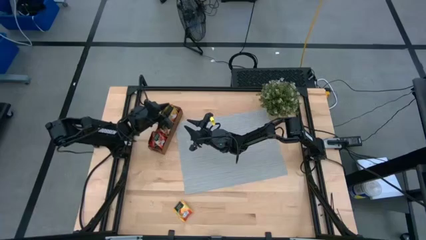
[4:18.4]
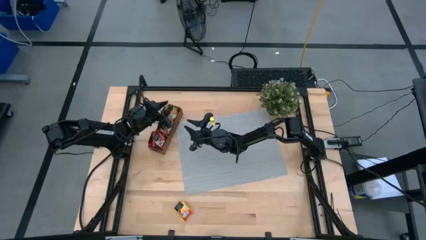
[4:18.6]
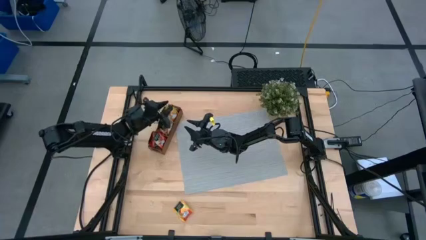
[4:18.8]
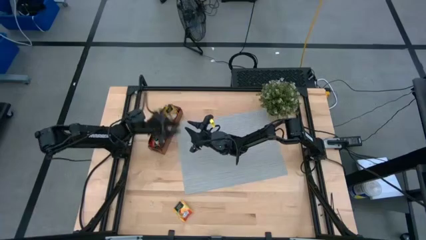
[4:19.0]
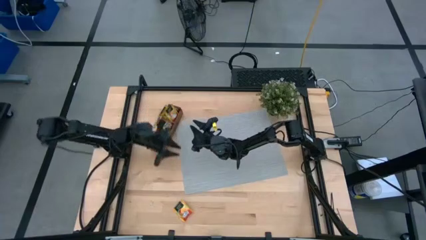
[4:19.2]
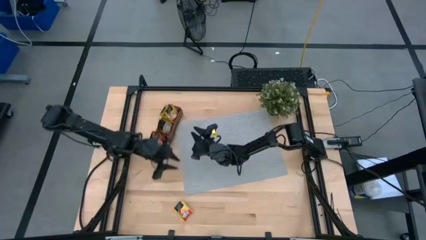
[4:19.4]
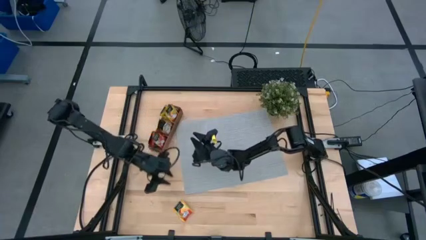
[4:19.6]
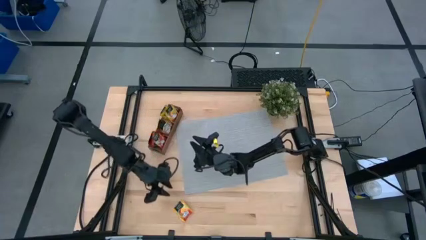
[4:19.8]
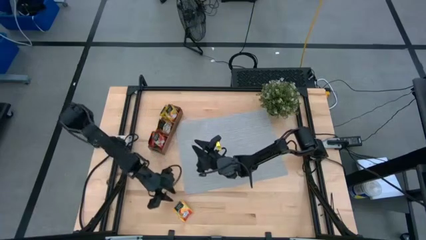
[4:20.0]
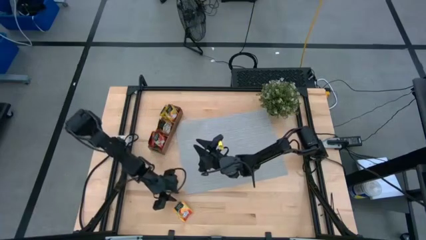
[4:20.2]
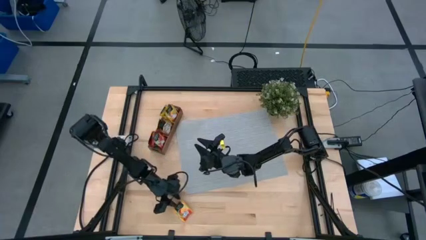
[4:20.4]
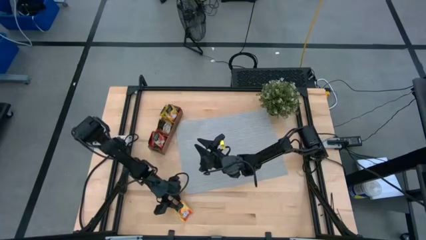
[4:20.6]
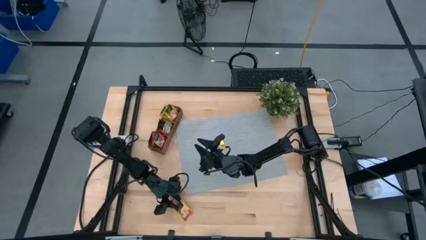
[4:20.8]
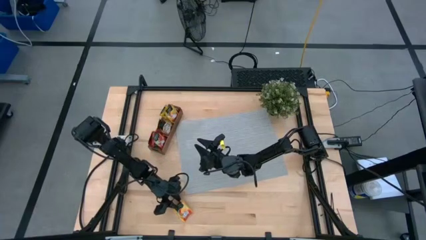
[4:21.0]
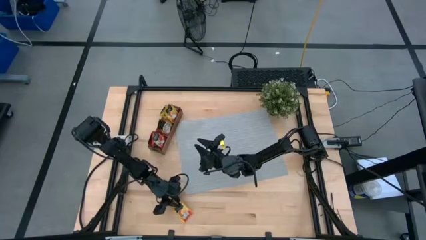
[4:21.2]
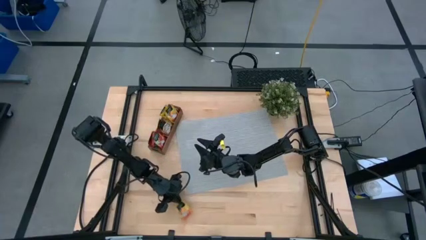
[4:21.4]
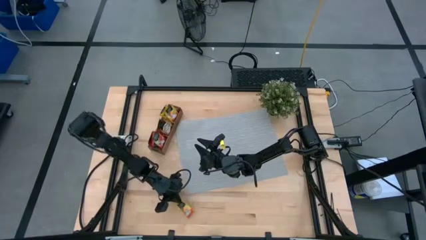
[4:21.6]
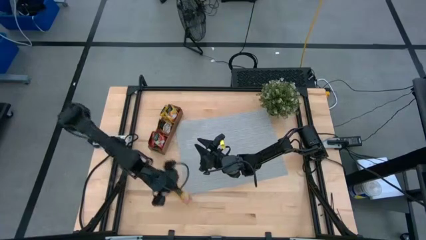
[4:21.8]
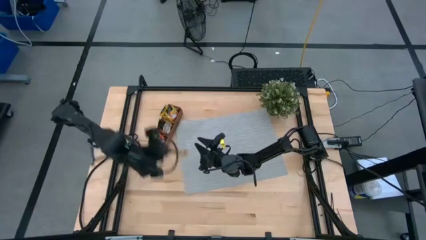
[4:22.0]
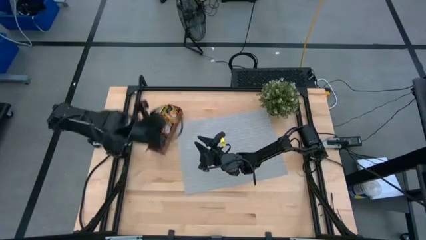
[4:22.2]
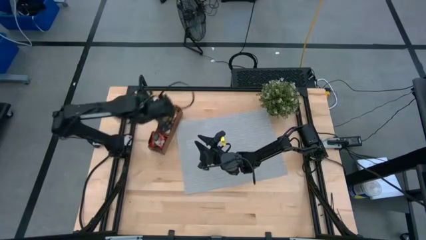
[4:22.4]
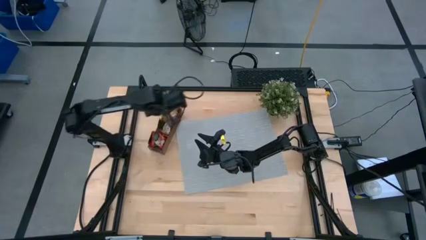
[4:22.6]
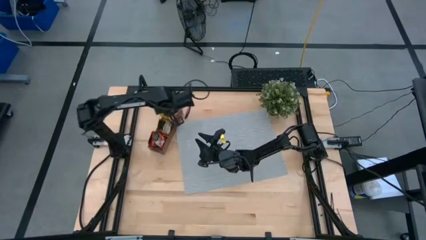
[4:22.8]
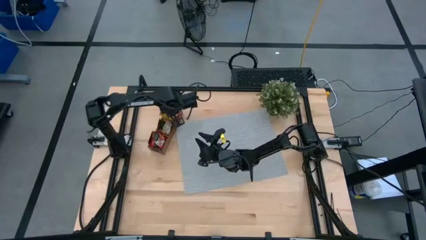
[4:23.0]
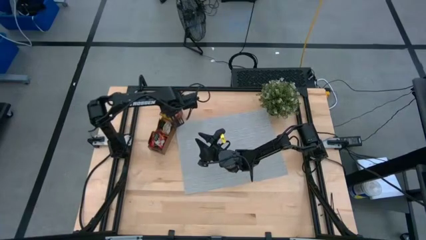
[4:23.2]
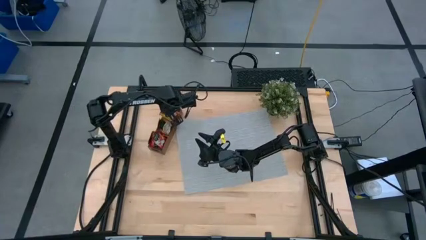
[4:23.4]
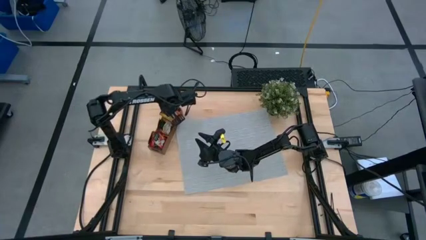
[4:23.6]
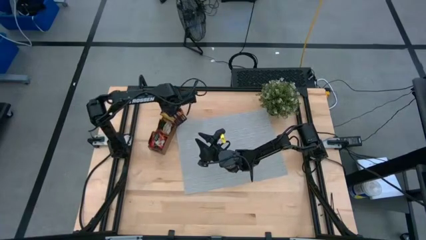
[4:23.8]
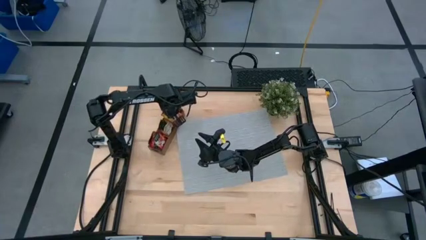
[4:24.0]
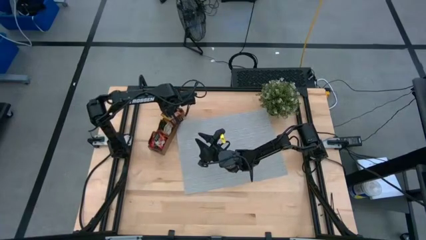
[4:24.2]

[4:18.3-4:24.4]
Task: Pick & Place Tea
Put the yellow tea bag into the right section of the wooden organizer

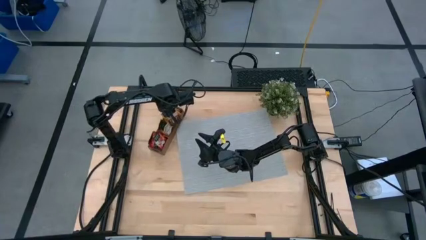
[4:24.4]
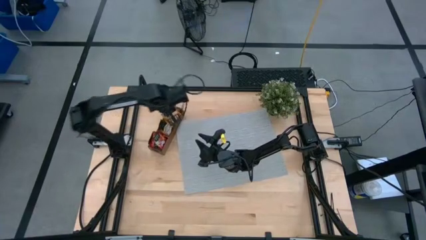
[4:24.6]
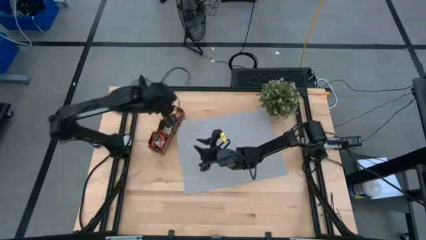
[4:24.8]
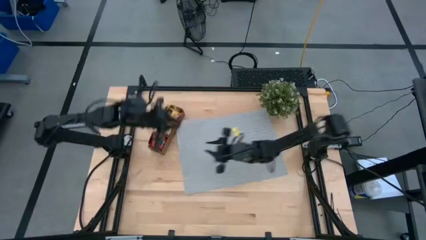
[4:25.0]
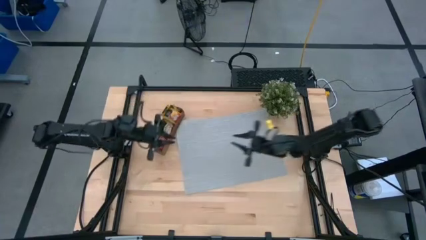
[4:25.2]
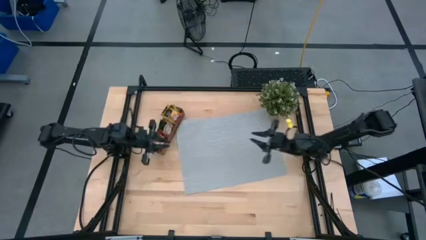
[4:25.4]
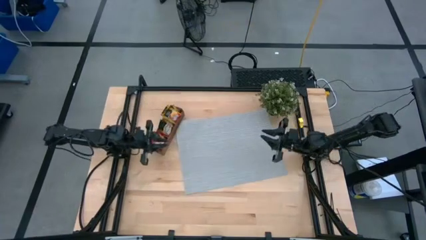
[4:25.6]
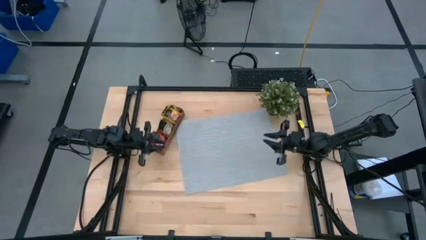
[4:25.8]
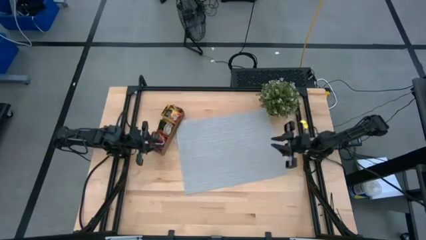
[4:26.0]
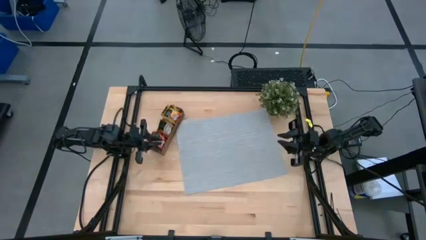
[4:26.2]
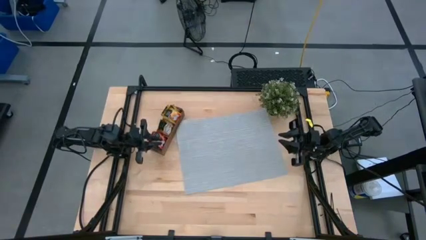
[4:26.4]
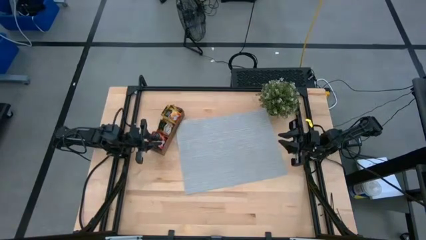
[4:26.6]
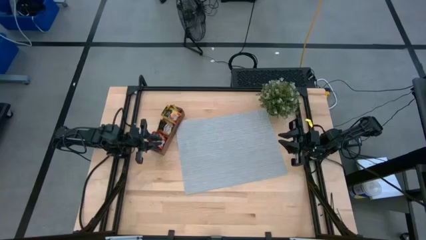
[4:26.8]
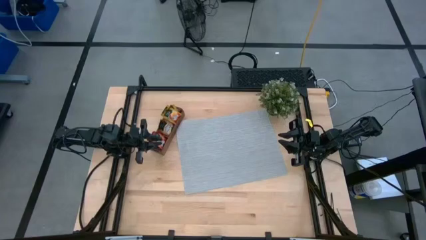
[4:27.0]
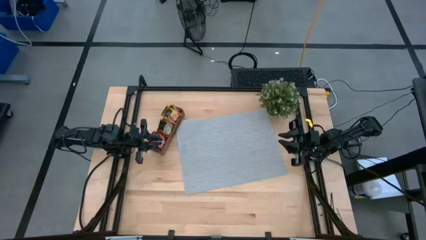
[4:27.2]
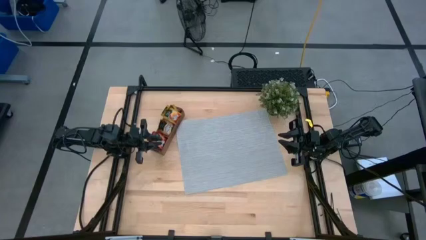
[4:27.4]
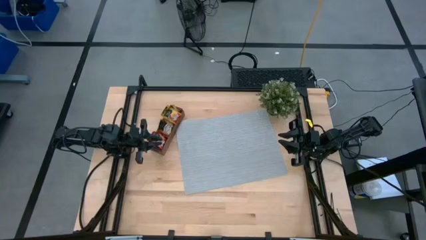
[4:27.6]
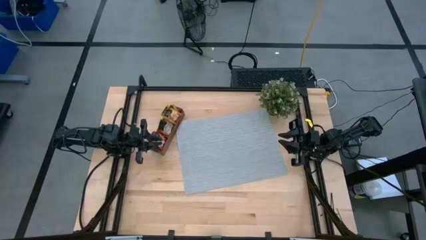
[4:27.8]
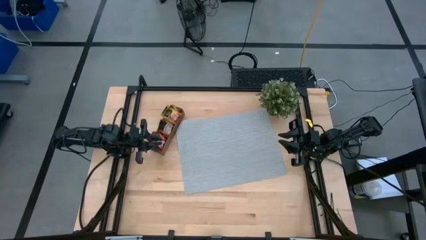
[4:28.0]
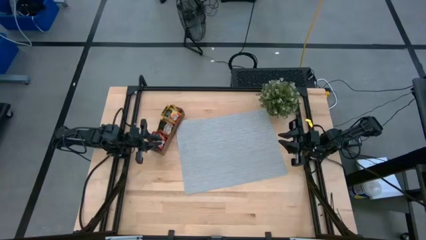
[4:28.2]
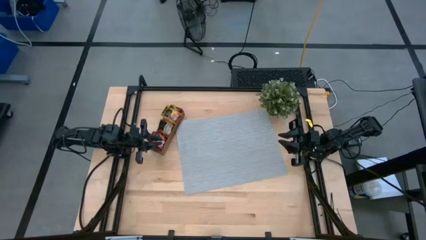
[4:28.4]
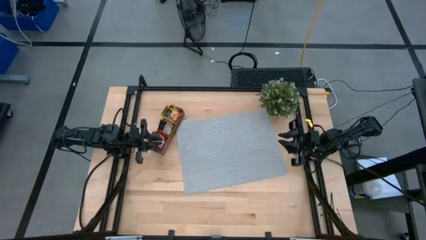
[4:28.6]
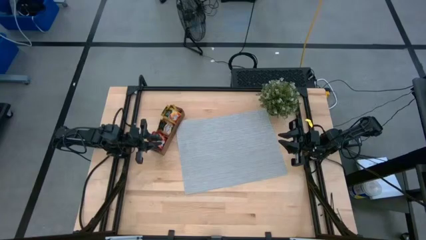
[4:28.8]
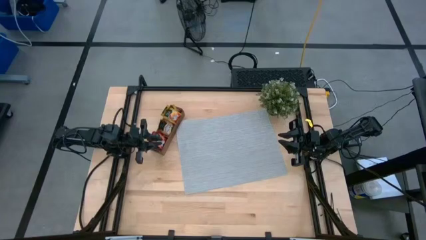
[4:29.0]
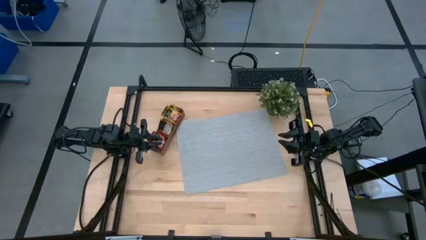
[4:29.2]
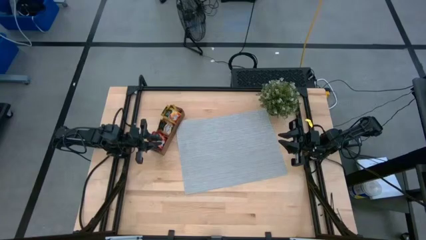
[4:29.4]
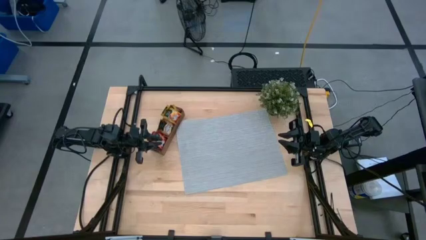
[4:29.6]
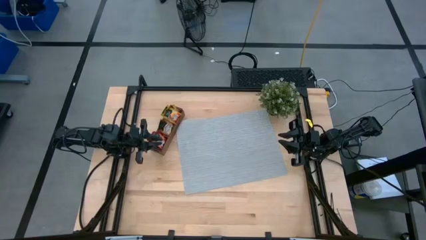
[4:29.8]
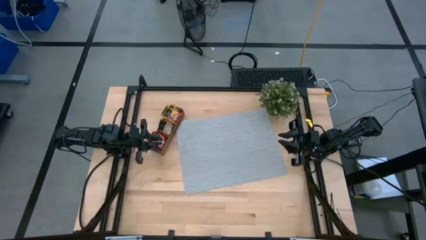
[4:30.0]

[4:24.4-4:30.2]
Return to Home Position

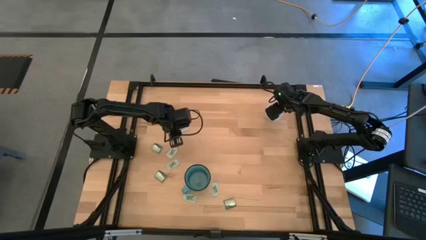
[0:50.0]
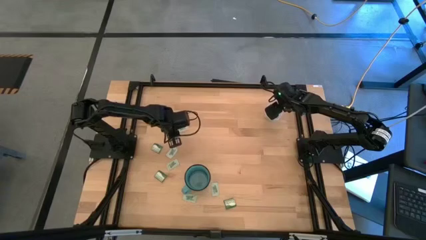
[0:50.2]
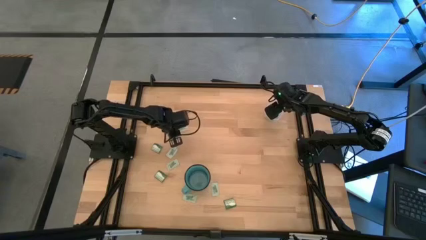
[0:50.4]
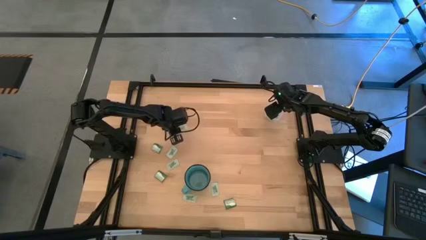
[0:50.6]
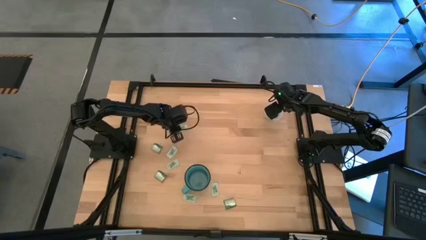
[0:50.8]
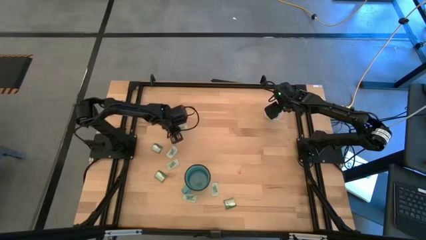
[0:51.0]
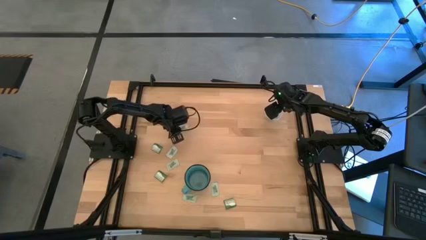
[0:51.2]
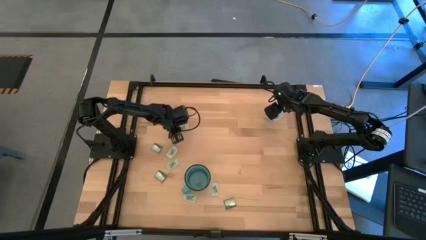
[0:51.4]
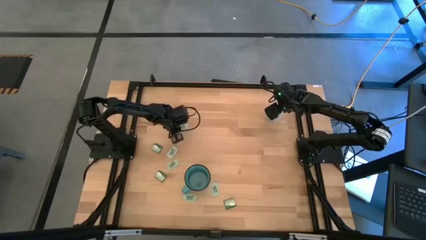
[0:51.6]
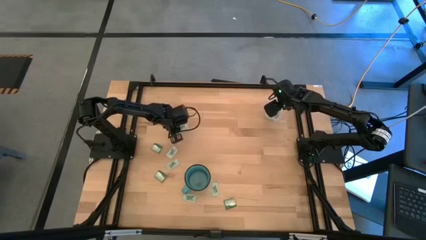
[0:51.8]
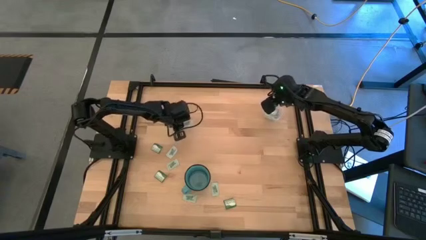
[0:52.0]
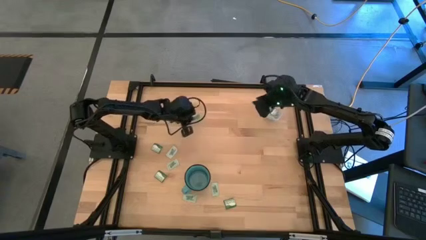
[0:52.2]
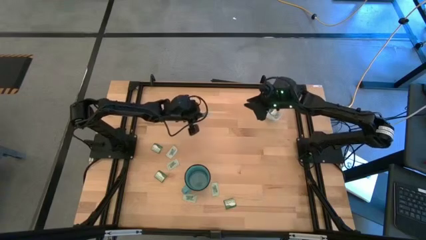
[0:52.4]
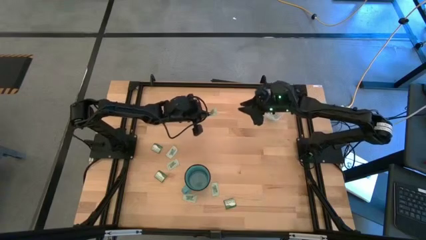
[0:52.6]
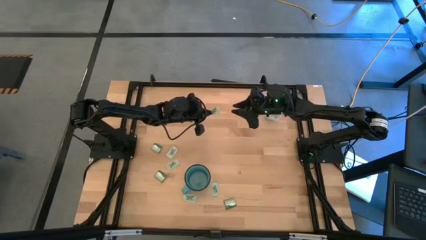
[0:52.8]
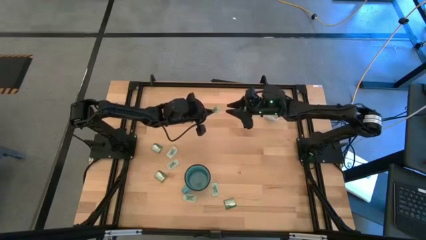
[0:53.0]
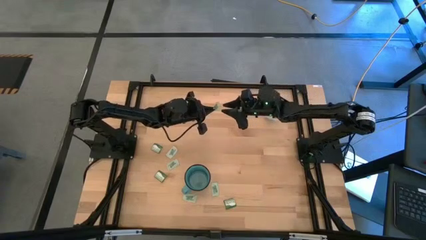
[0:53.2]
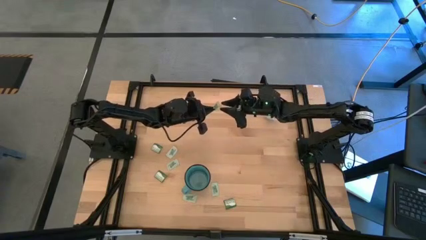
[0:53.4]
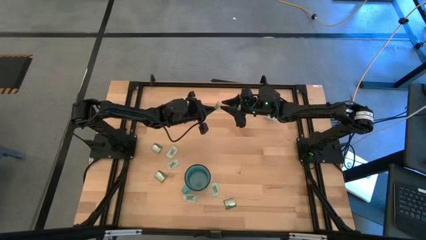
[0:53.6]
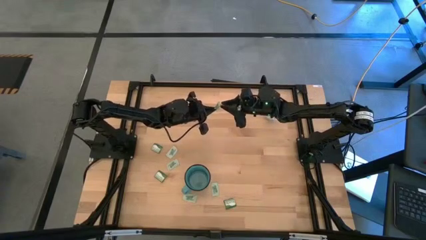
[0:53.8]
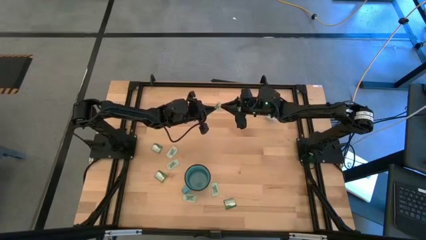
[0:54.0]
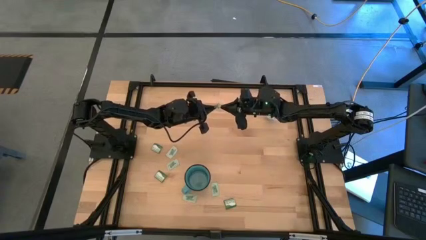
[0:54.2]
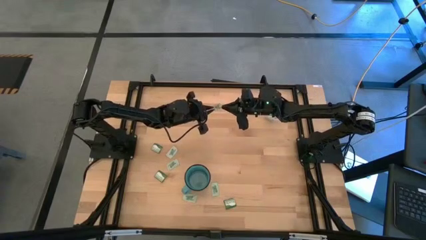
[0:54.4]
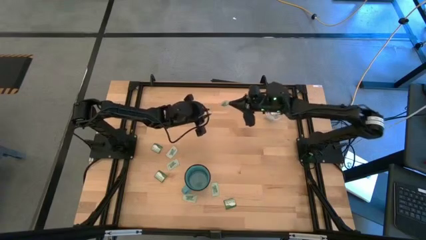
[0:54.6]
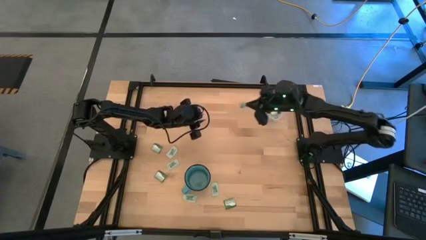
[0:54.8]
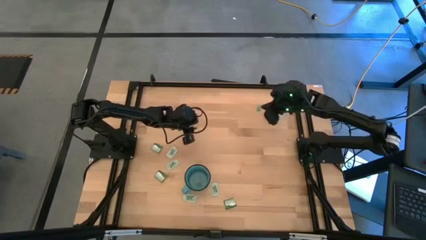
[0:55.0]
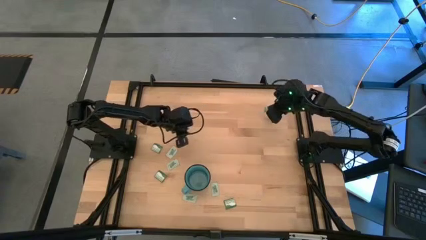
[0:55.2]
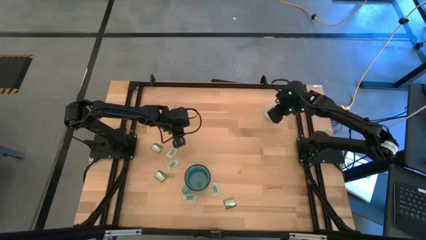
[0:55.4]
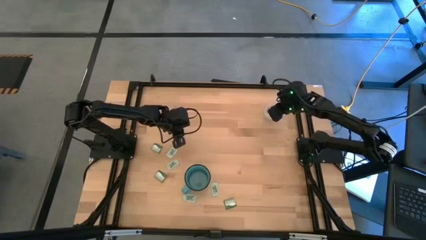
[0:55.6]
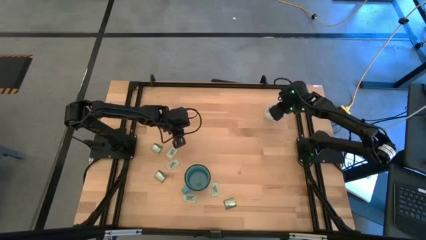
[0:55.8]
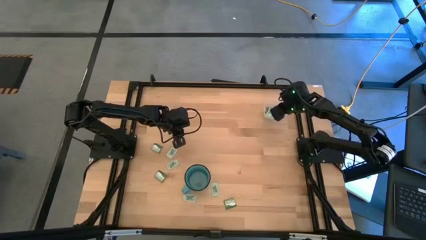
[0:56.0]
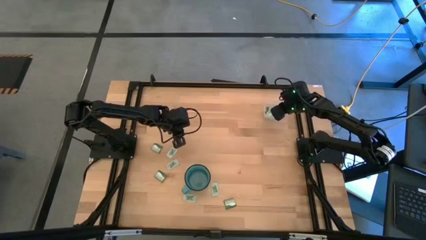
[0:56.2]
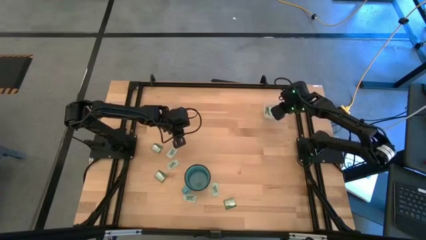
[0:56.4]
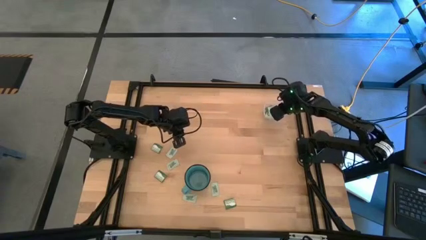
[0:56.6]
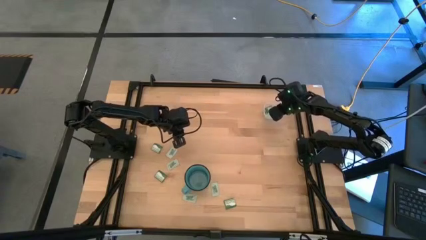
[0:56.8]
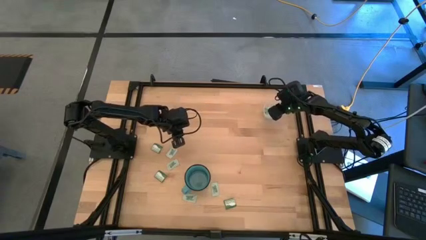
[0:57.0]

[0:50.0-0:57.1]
Task: Pick and place items into bin
Put the stevia packet into the transparent bin
